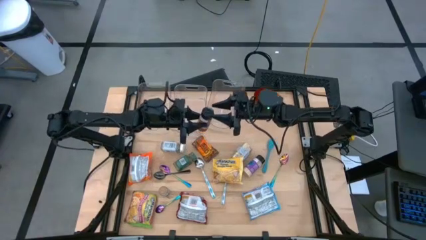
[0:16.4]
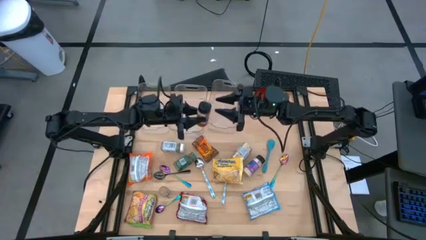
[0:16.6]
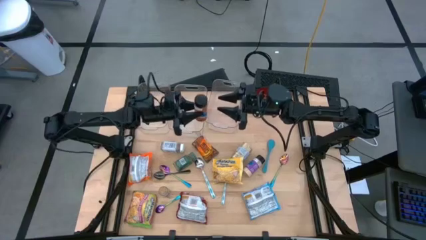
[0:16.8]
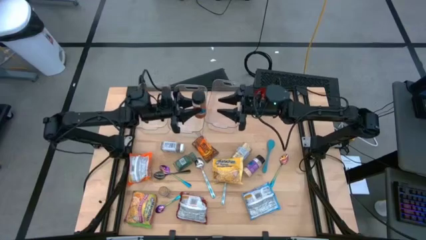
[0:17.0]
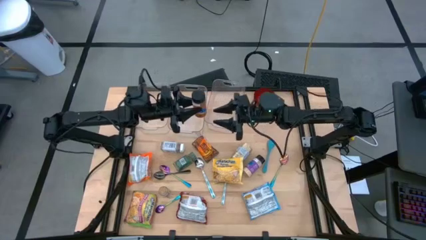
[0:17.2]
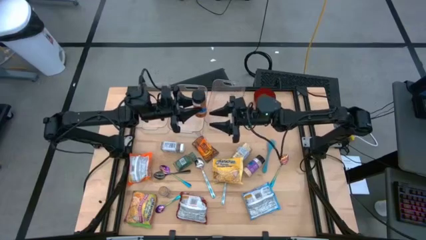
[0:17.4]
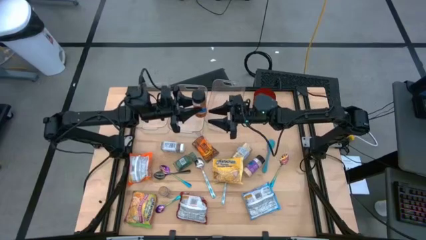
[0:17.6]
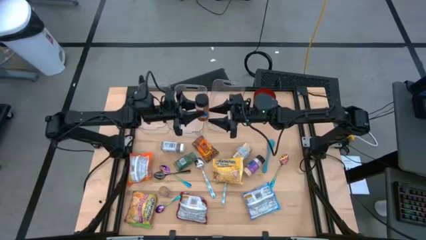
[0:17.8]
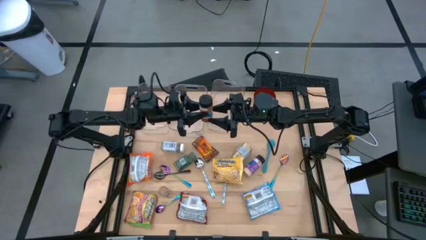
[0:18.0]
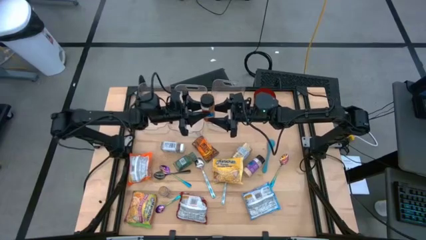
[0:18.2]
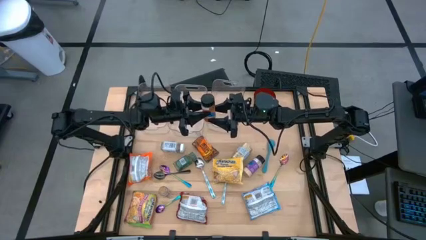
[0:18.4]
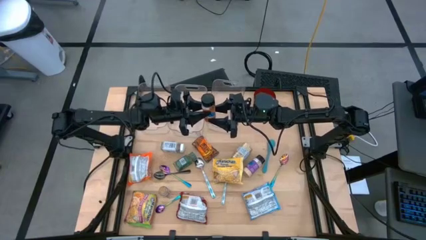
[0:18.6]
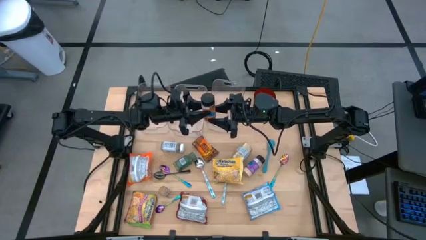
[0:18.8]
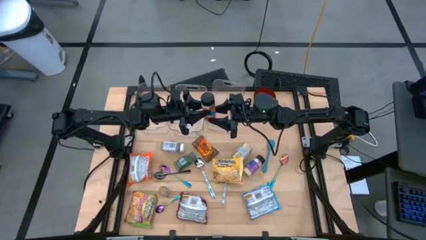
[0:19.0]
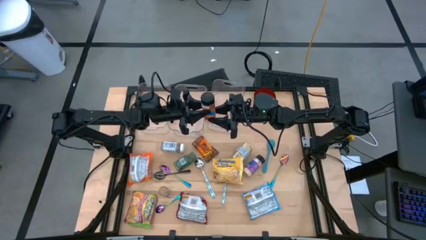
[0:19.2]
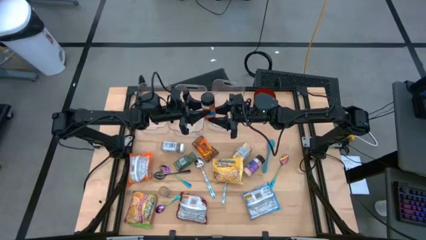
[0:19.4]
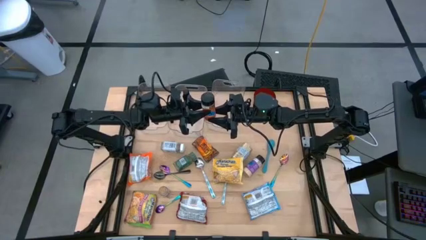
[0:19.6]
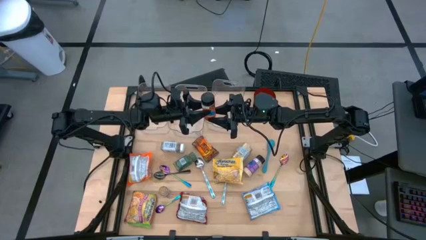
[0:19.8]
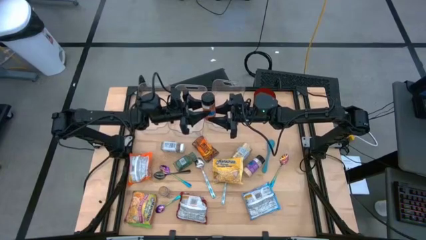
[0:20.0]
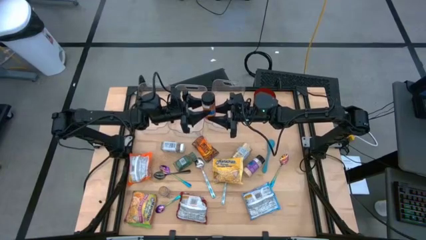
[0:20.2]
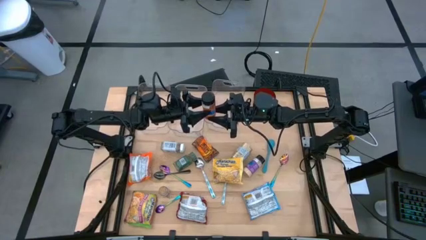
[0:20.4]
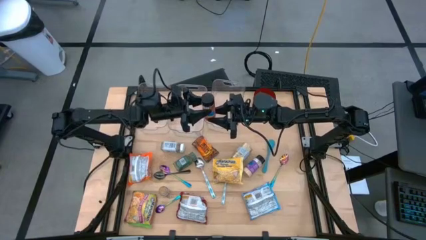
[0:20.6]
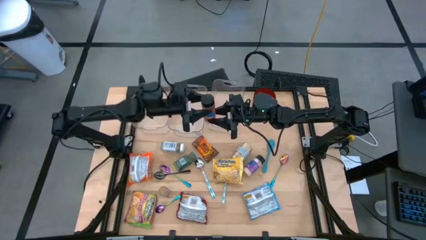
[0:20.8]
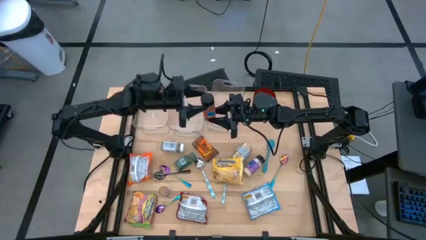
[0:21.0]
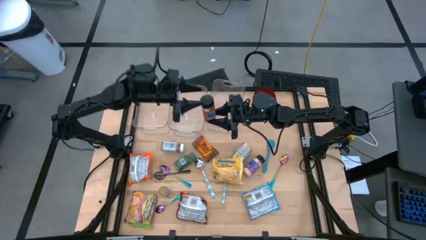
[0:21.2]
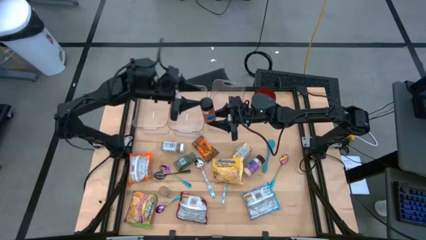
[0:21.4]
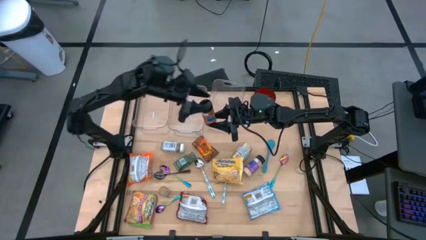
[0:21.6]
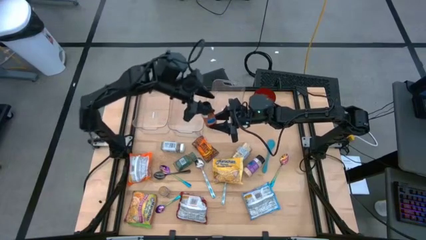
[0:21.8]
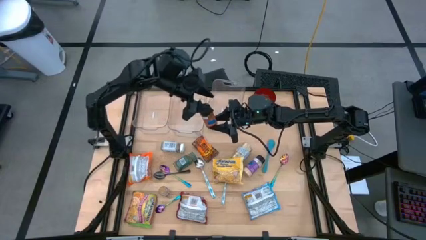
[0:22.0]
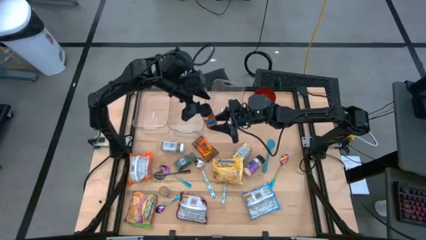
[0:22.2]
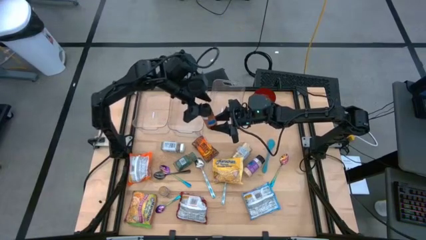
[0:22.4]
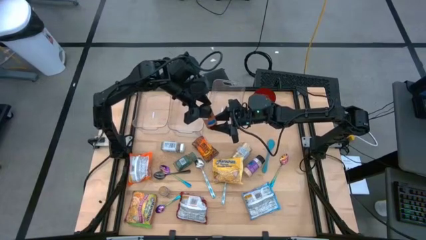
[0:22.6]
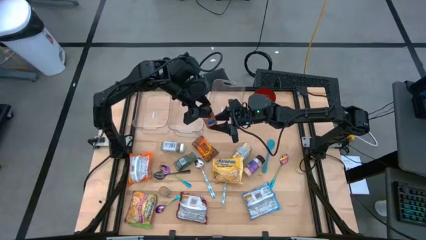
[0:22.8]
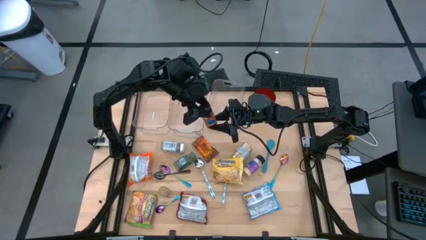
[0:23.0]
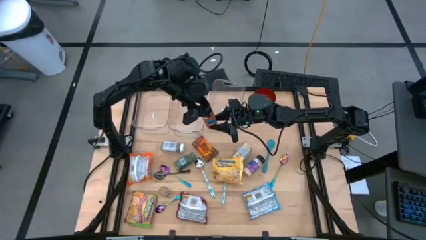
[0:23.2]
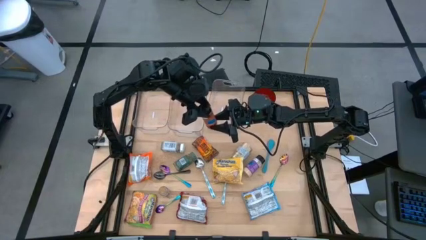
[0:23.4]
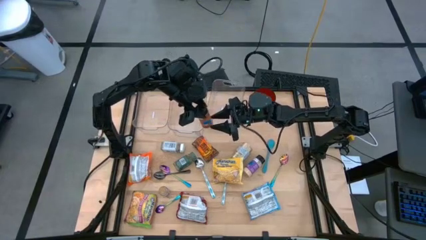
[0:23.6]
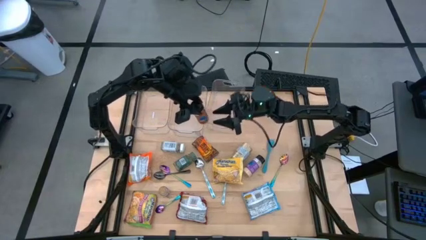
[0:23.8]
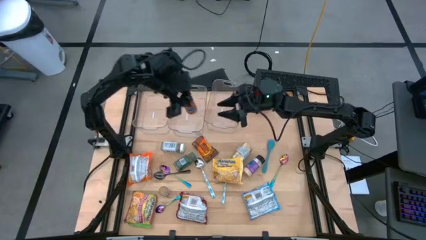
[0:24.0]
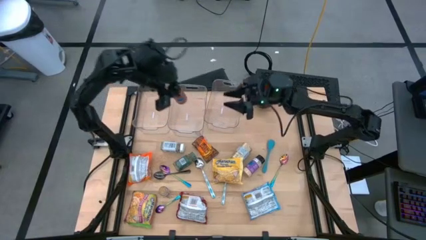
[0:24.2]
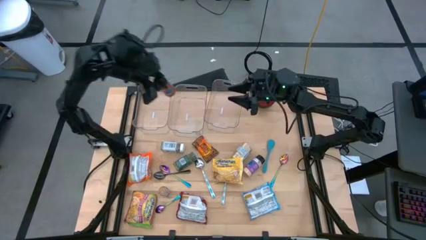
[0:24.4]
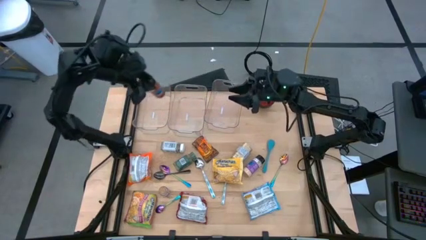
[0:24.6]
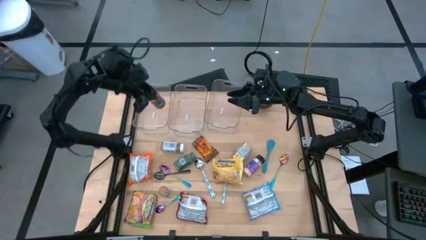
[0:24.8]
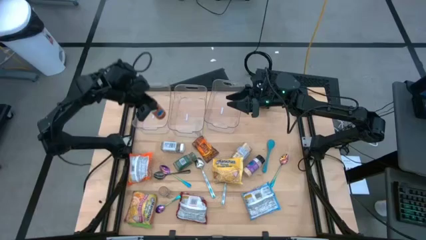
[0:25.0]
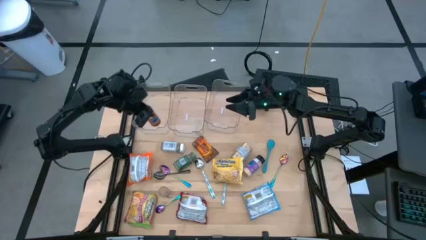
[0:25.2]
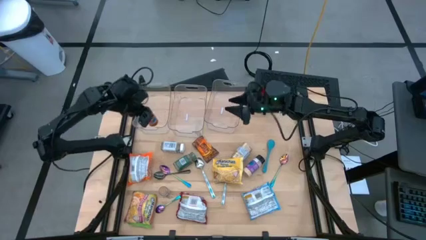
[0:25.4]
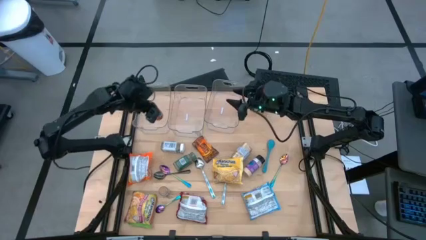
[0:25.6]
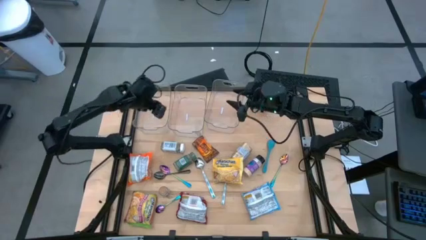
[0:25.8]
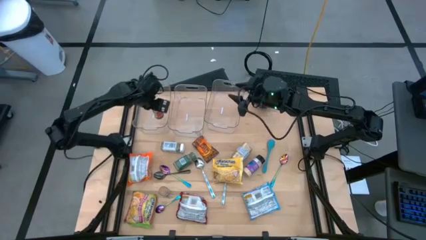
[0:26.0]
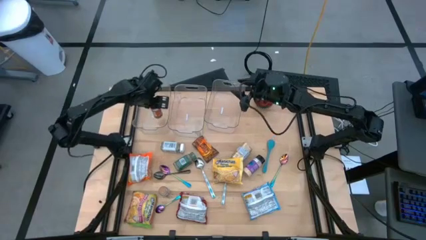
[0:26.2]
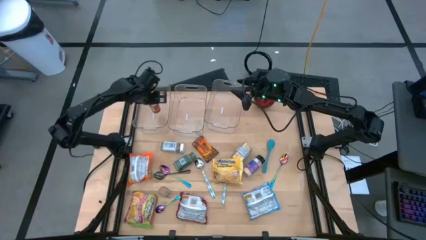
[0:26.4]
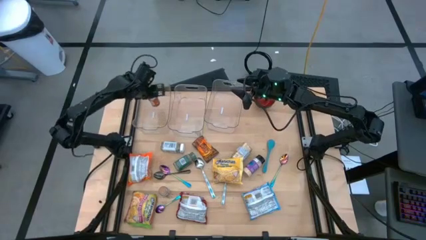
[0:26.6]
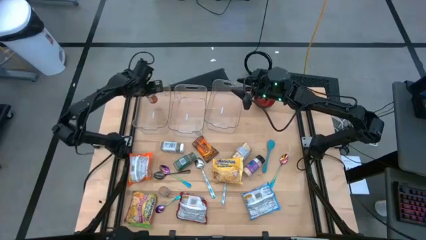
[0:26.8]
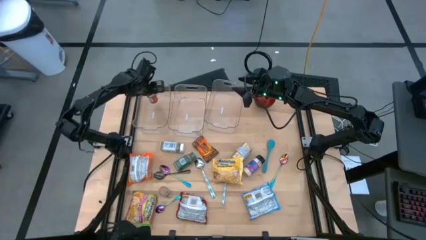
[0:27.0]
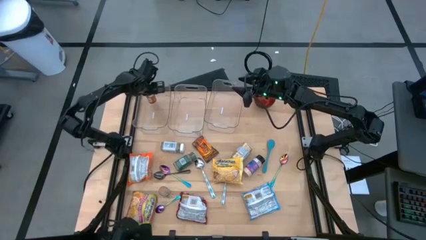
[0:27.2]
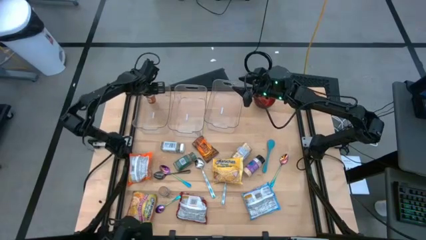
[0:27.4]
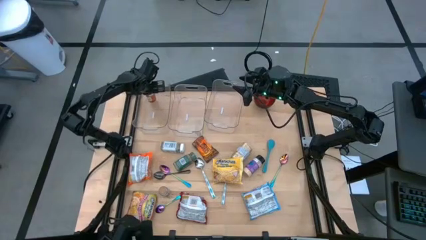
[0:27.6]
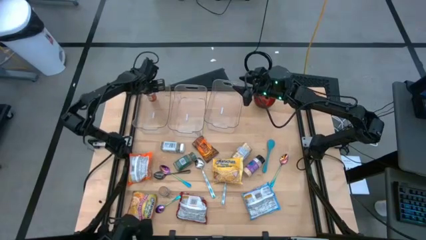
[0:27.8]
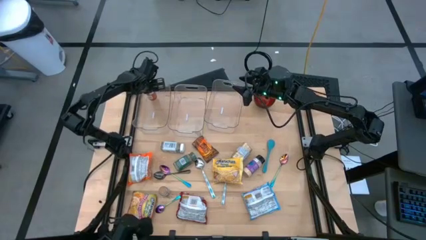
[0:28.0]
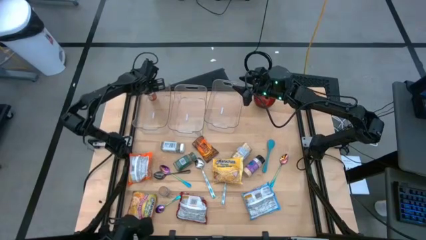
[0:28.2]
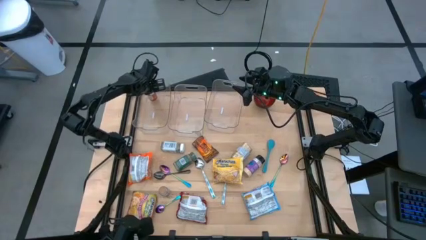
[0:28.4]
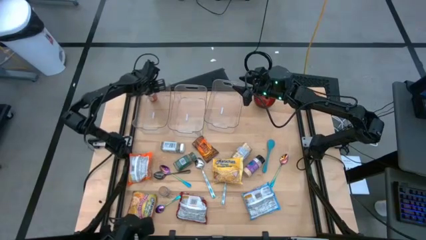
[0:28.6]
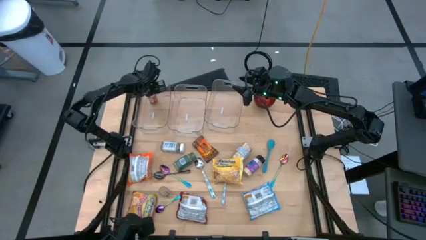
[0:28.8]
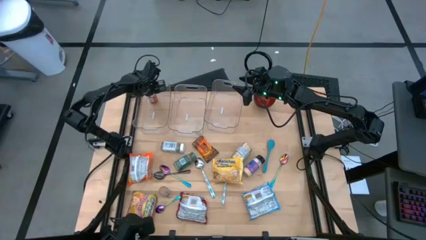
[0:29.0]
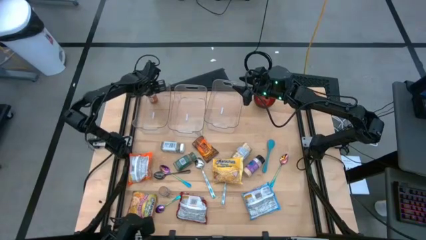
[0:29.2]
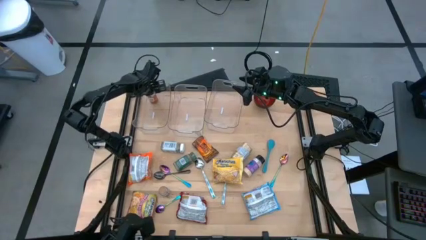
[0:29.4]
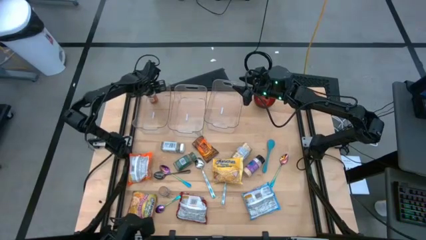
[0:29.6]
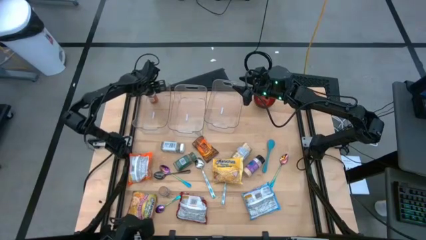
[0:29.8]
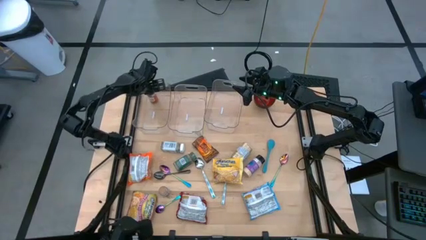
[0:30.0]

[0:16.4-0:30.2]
Task: Pick & Place Food Item
Put the orange spice bottle into the left transparent bin
